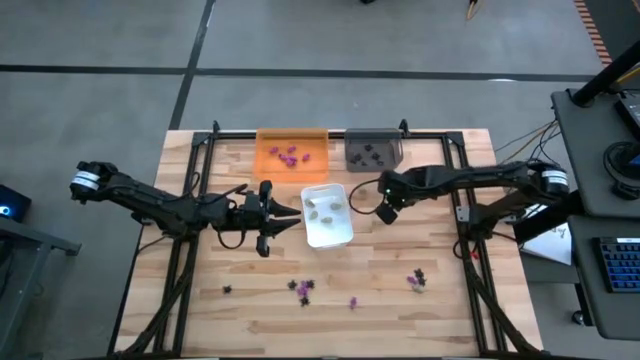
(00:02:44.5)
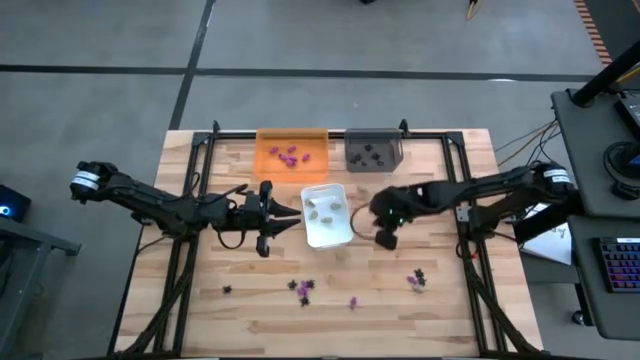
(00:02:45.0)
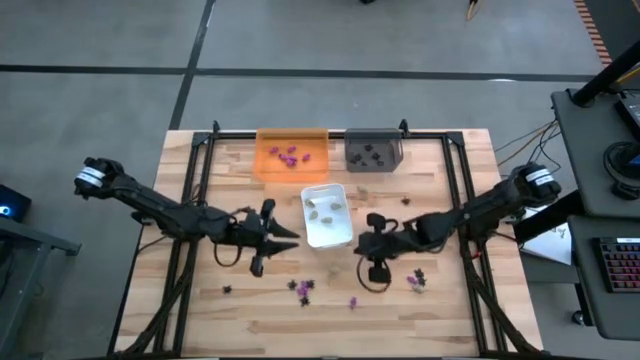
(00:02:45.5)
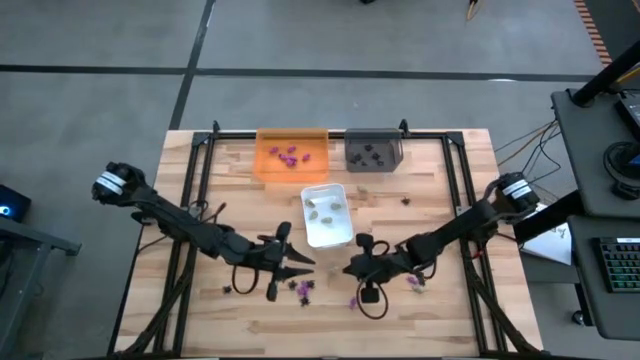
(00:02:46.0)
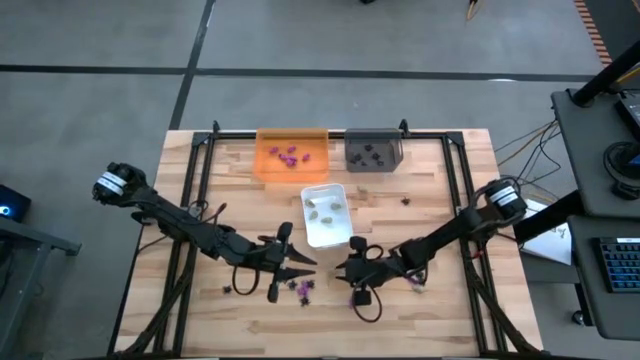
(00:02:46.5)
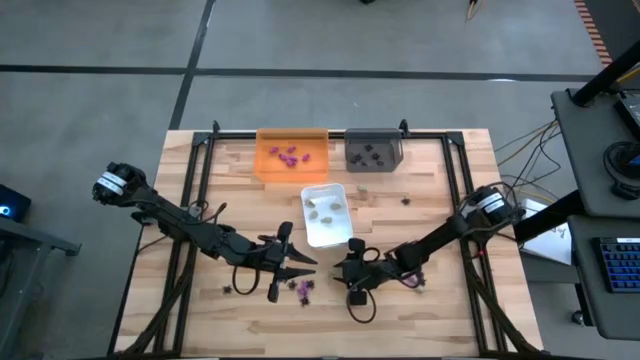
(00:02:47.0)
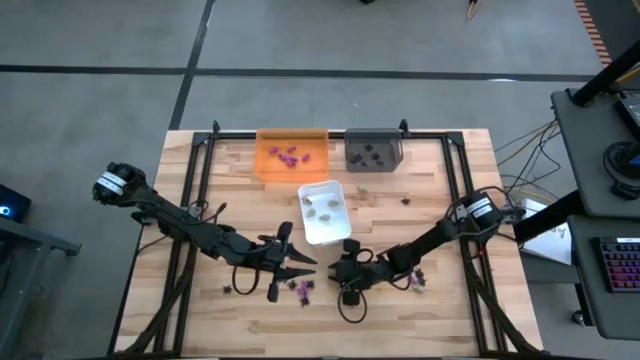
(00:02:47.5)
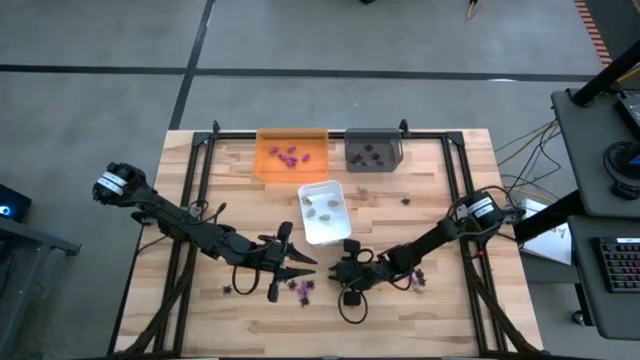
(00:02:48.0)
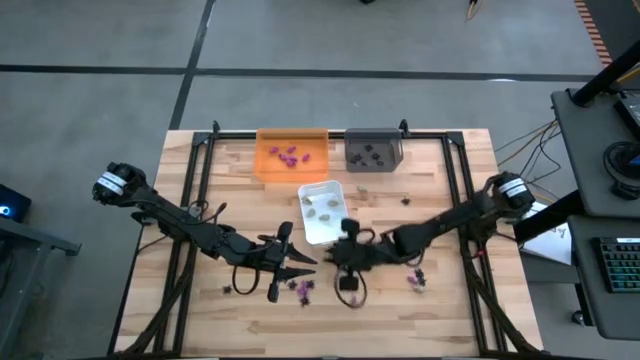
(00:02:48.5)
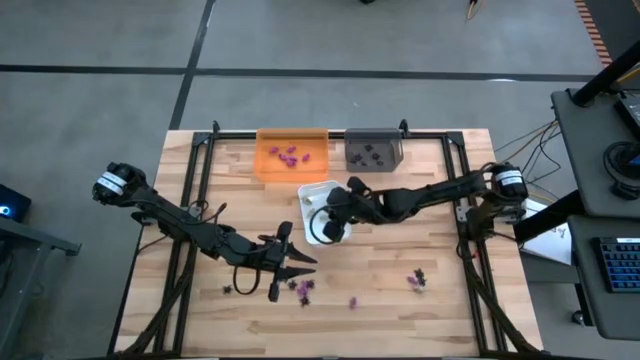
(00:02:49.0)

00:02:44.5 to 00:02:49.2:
Task: Sort Halloween decoration
Put the white skull toy into the white bin

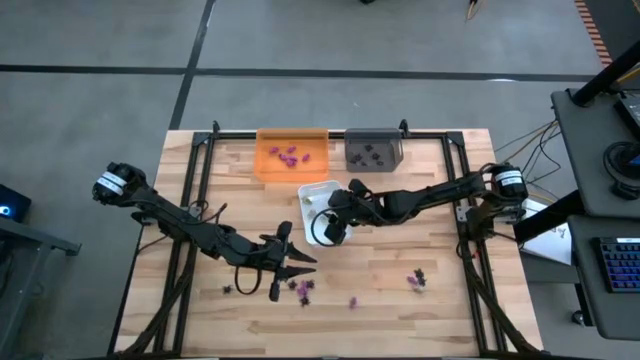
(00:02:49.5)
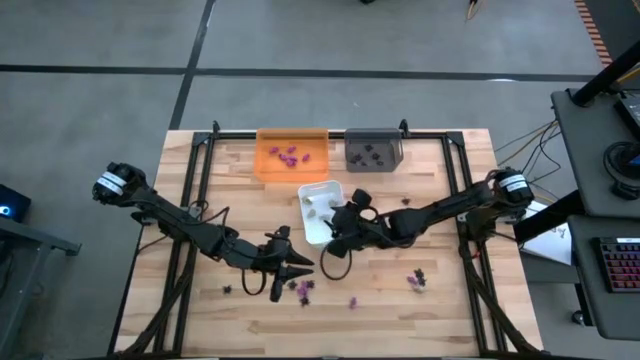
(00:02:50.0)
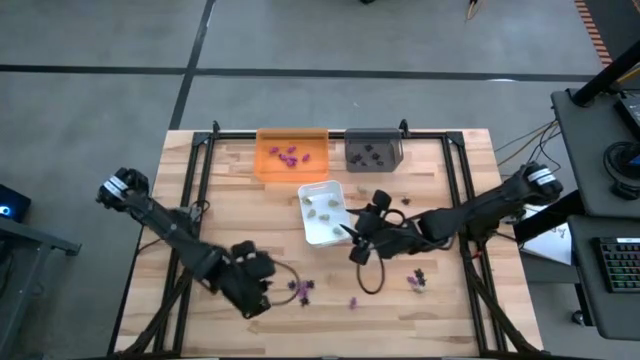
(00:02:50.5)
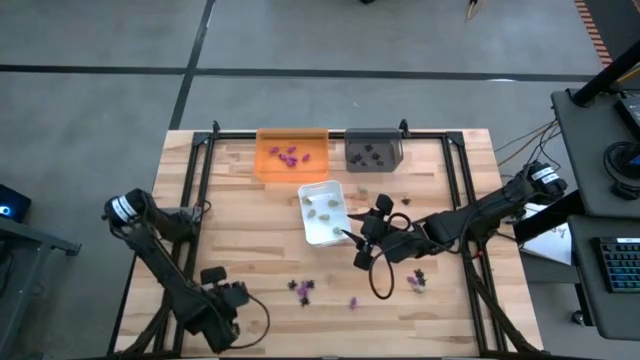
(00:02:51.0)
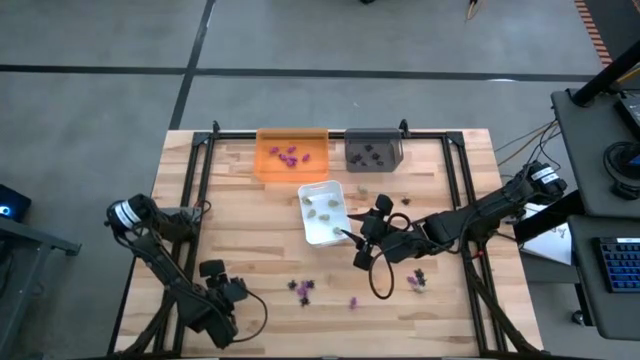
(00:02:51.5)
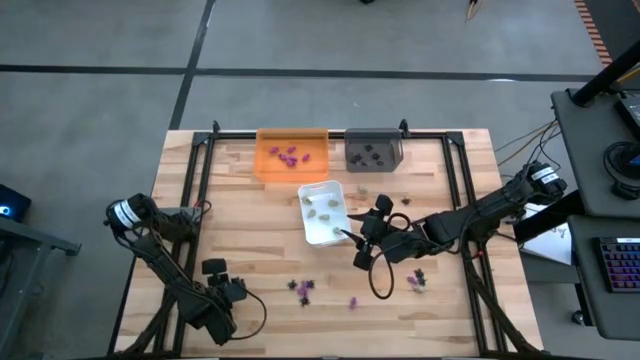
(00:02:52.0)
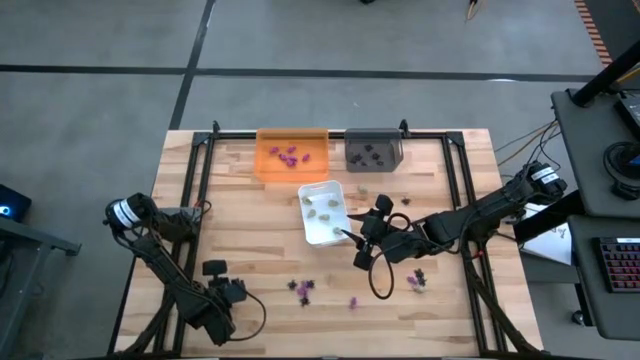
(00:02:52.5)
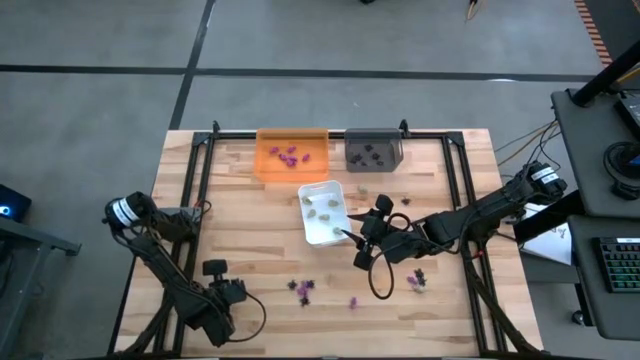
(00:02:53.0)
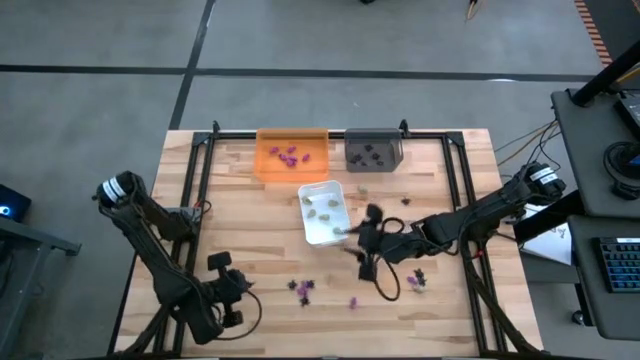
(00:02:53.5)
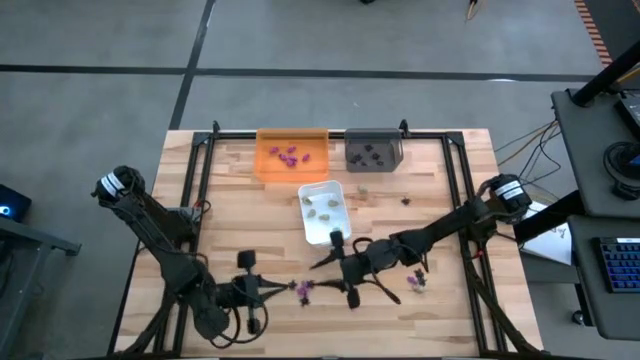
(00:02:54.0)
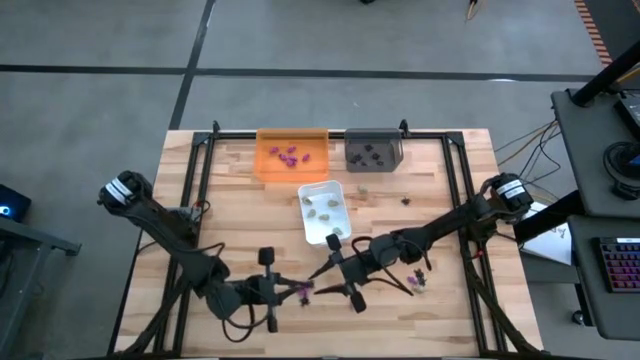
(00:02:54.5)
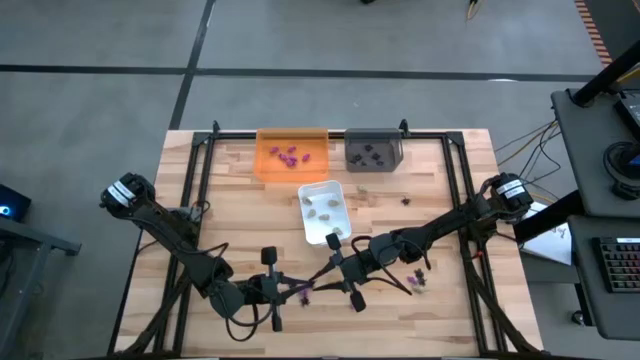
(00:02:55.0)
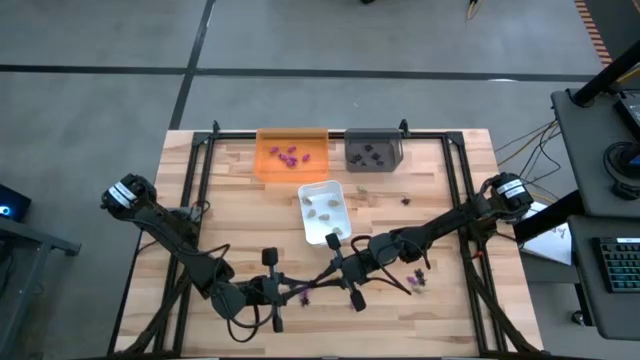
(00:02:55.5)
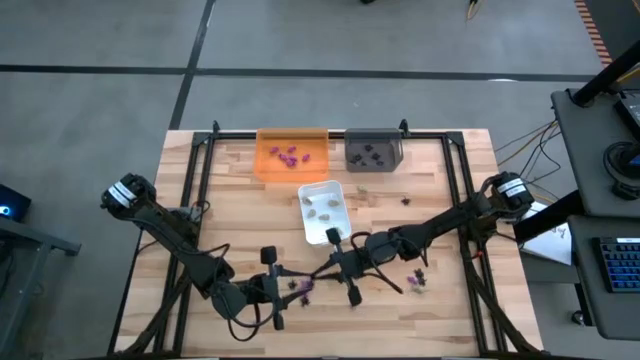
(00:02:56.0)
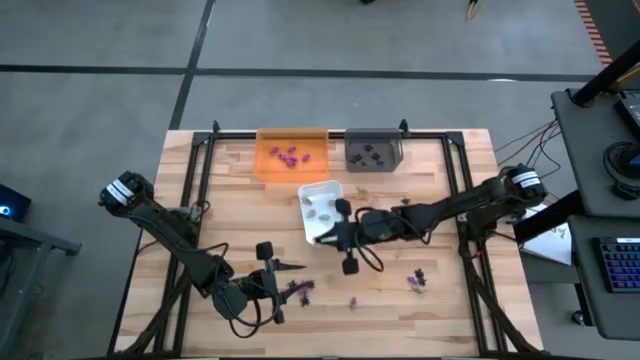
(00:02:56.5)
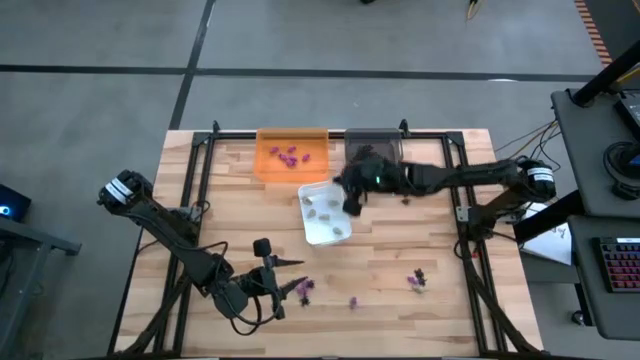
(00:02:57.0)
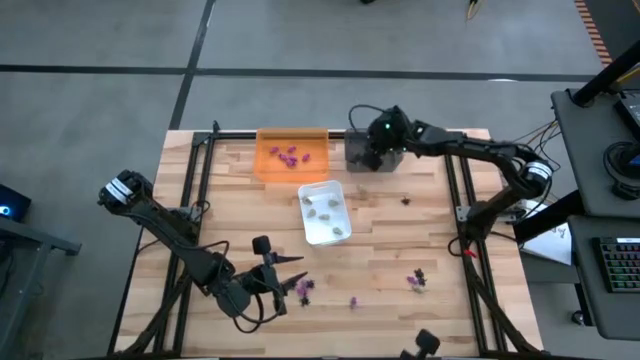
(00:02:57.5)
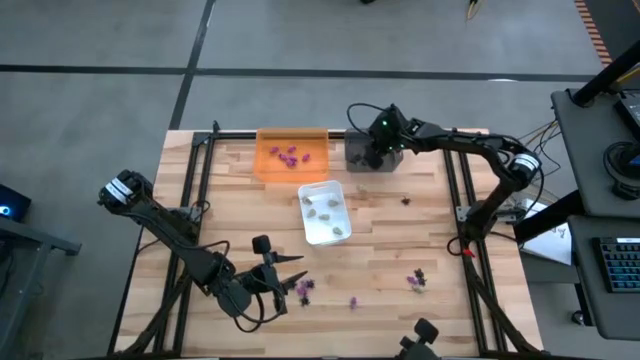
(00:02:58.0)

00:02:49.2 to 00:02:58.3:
Put the black spider toy into the black bin

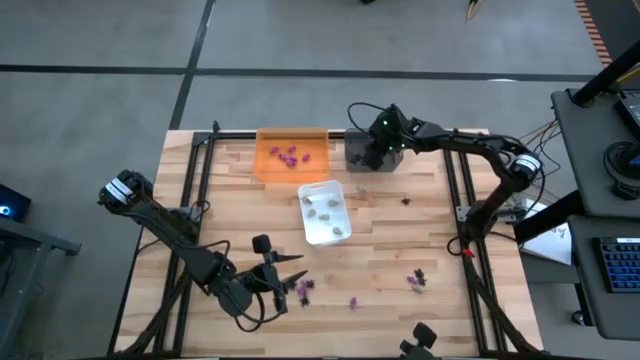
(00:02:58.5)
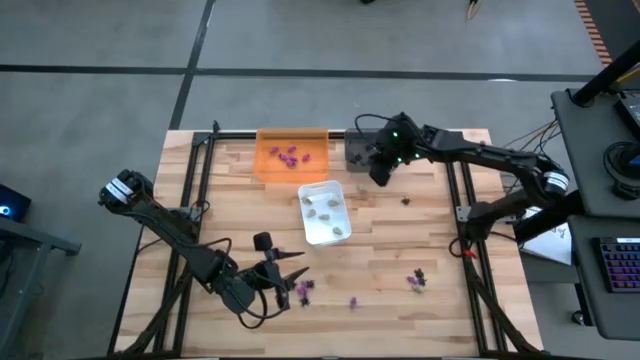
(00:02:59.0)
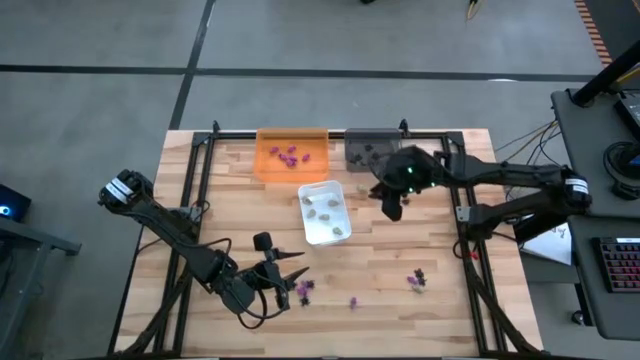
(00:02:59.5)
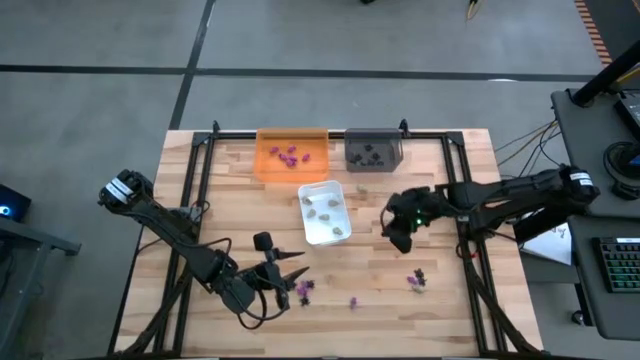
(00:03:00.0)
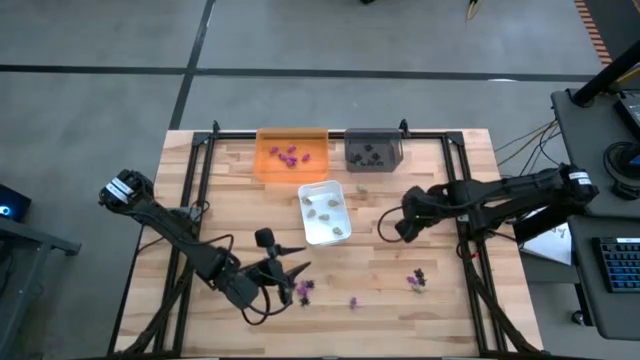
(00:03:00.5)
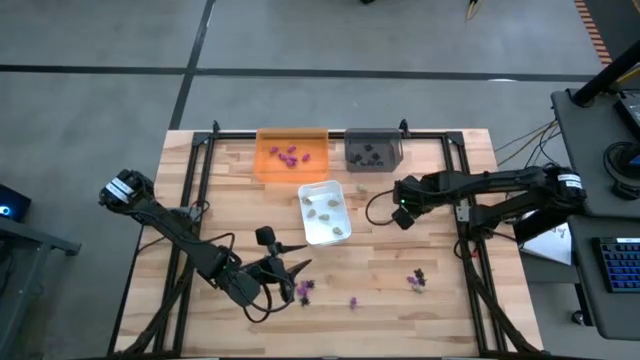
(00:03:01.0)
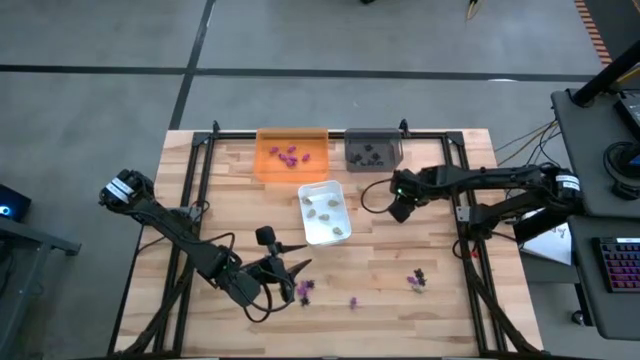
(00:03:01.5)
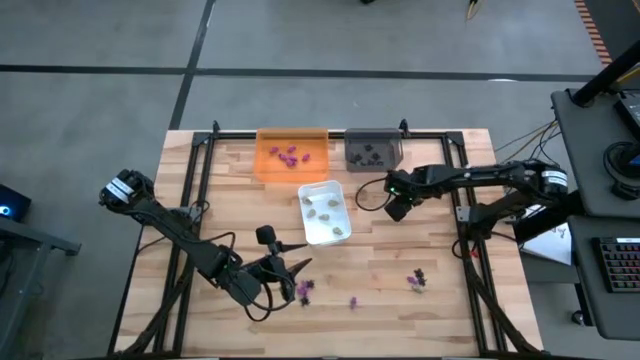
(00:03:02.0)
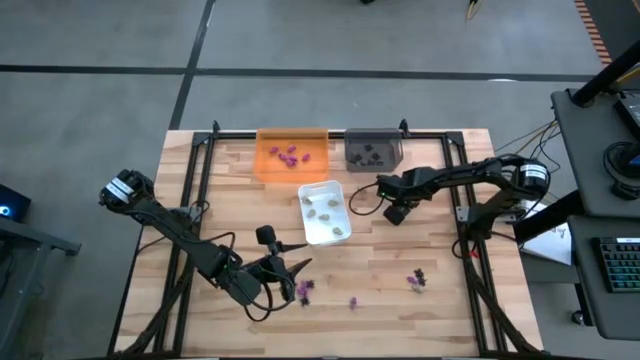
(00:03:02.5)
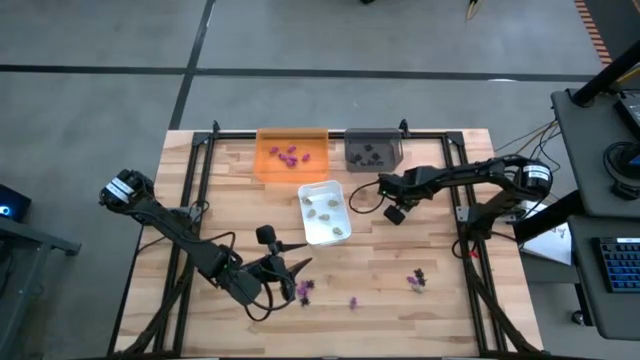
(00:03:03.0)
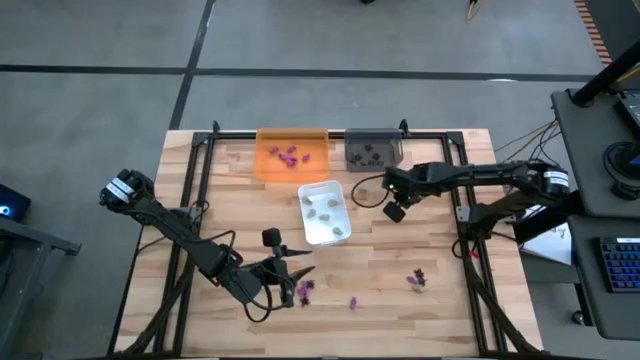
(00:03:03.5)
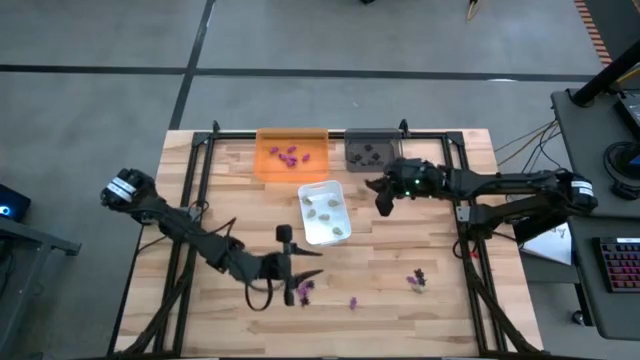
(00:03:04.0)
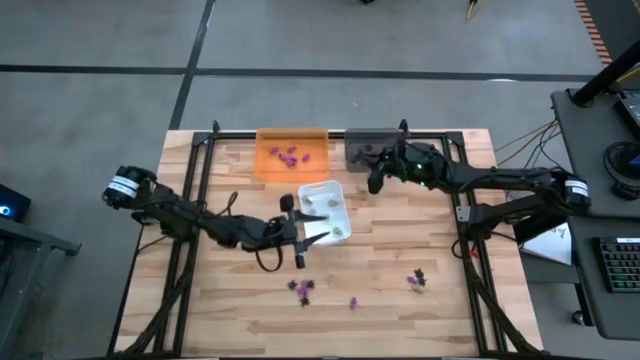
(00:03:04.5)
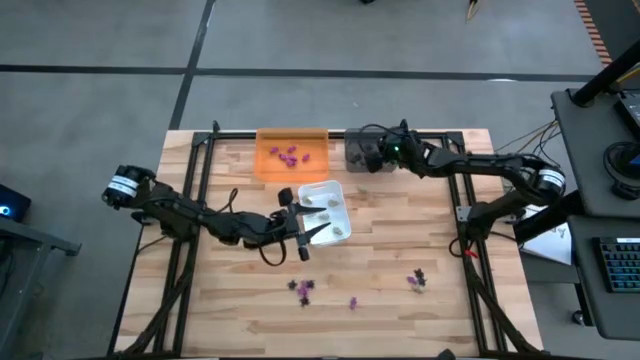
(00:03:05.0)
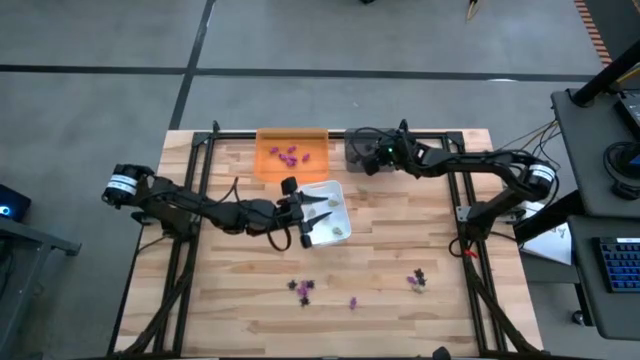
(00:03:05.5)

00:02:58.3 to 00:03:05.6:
Put the black spider toy into the black bin
